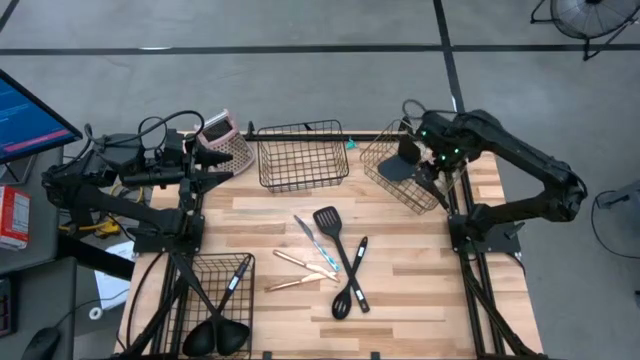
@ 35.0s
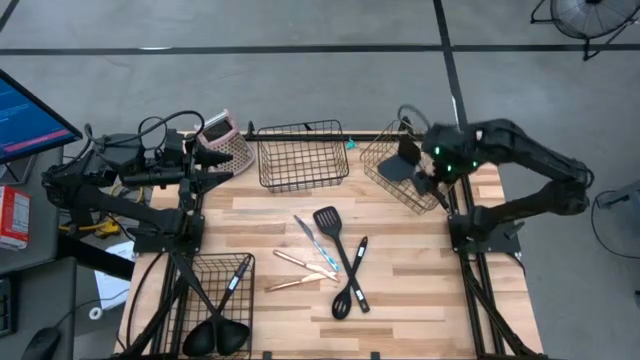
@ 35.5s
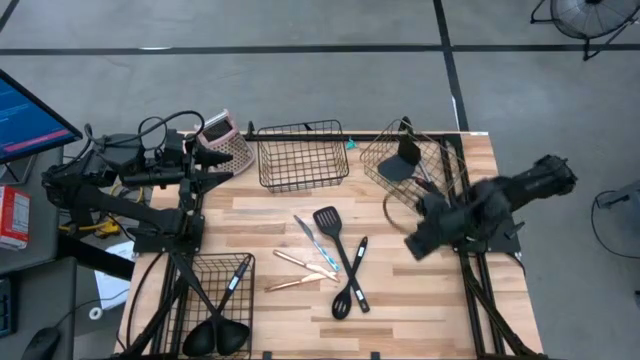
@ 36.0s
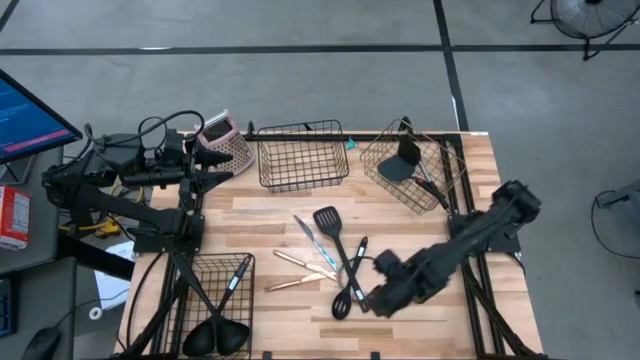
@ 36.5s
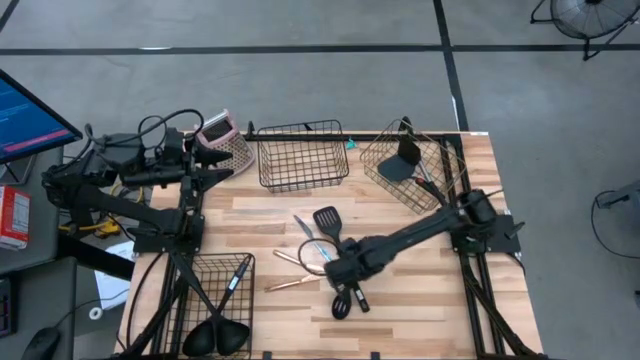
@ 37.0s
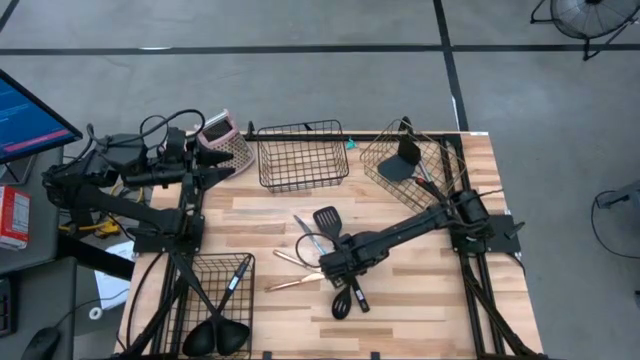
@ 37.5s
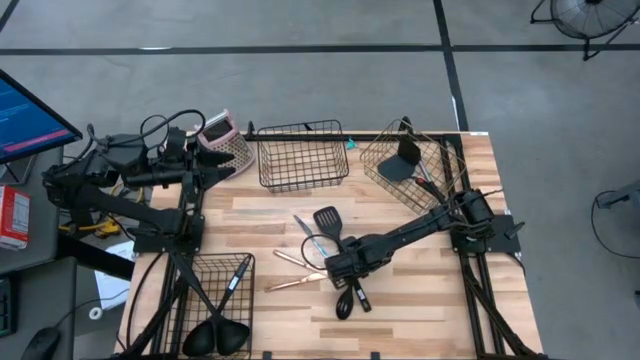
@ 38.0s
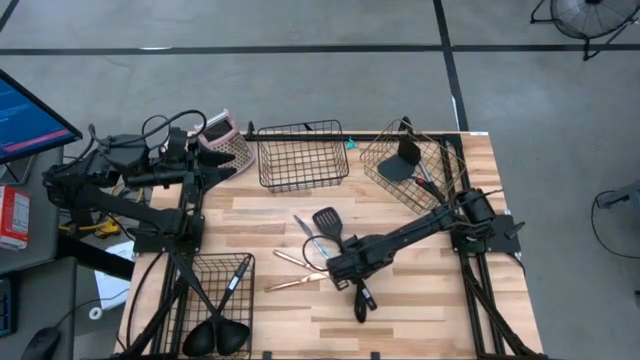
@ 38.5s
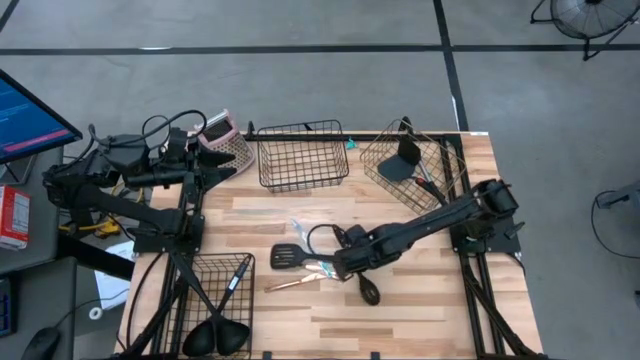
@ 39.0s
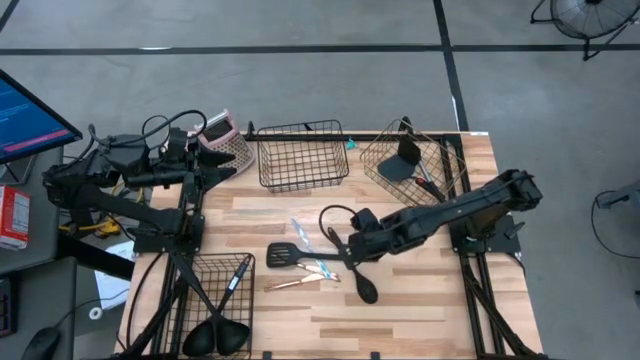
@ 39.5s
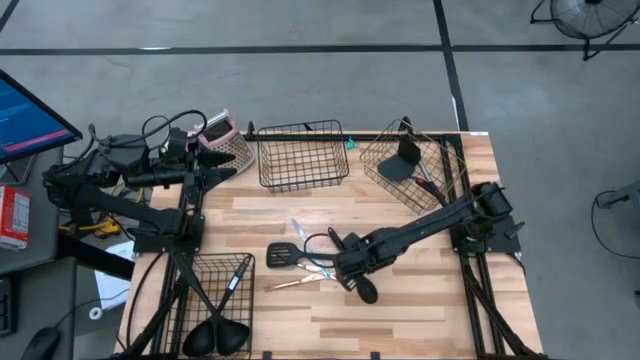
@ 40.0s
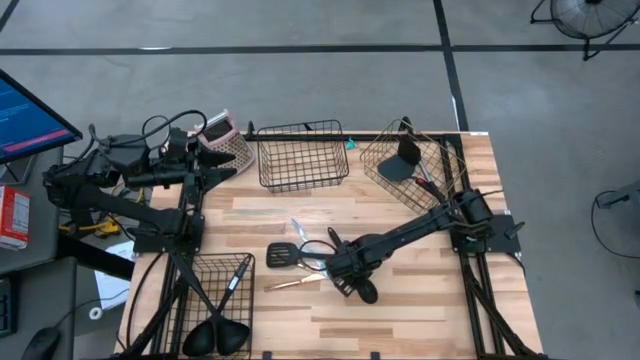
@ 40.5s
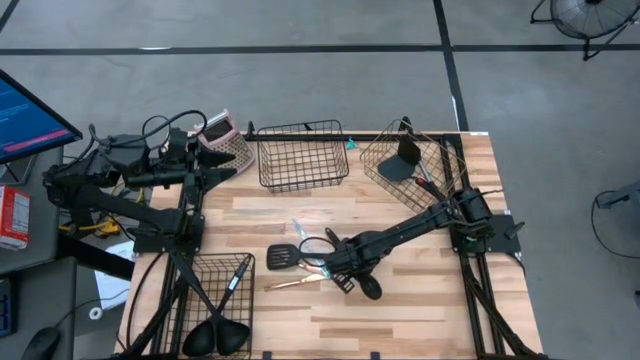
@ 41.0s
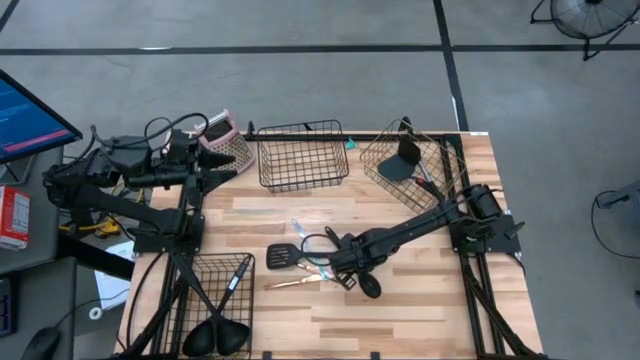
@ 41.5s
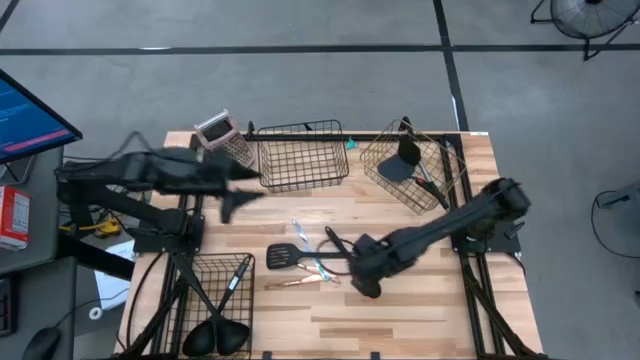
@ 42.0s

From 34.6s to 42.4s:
Task: Pick & Place Kitchen Items
Put the black serving spoon into the bottom black wire basket

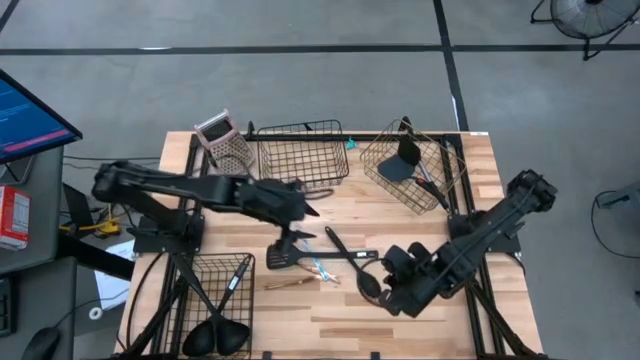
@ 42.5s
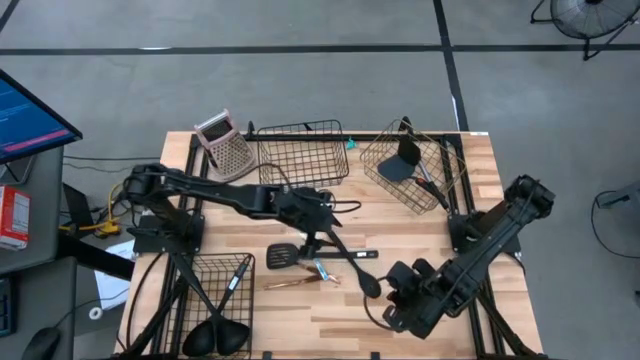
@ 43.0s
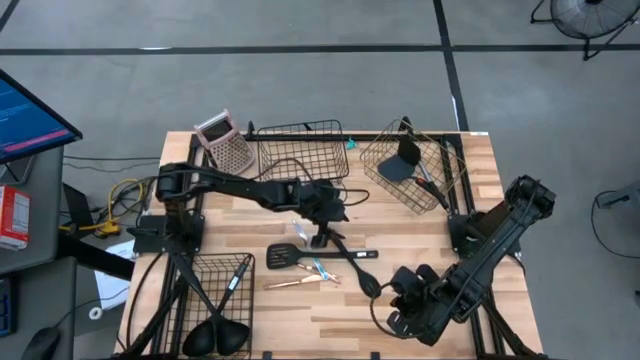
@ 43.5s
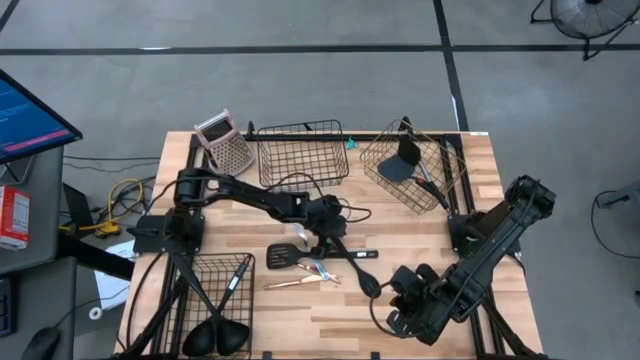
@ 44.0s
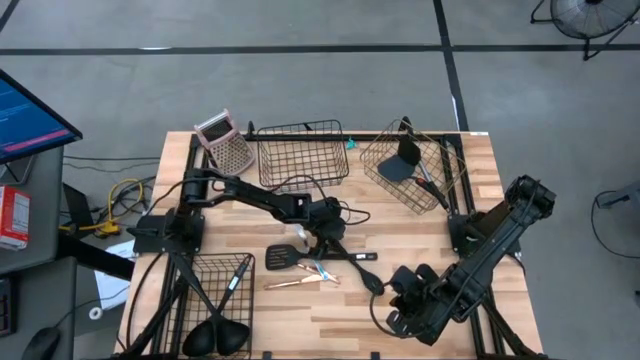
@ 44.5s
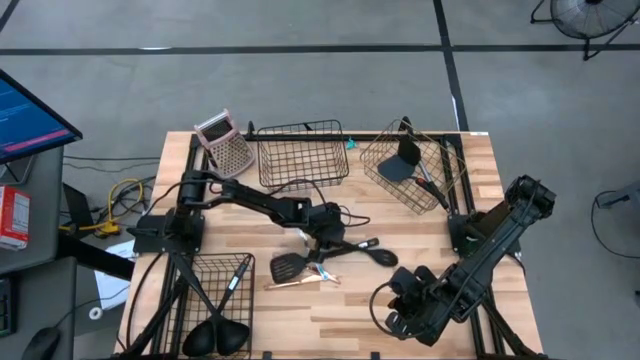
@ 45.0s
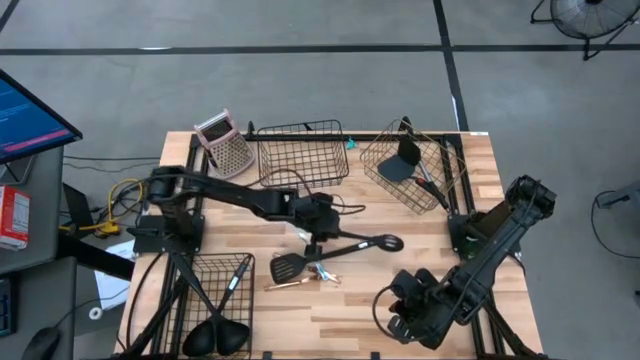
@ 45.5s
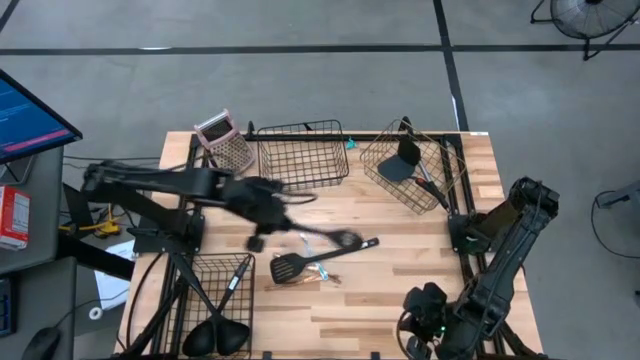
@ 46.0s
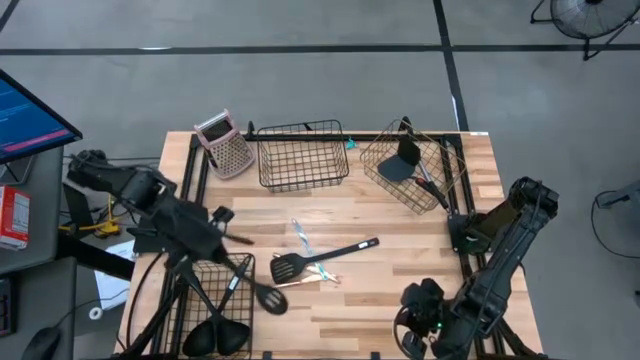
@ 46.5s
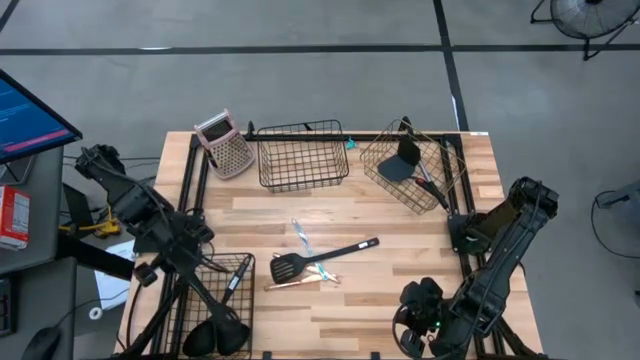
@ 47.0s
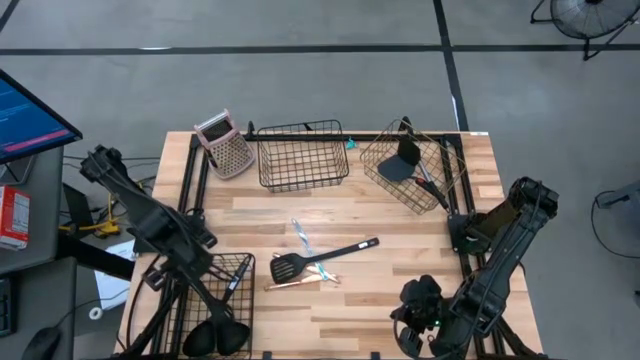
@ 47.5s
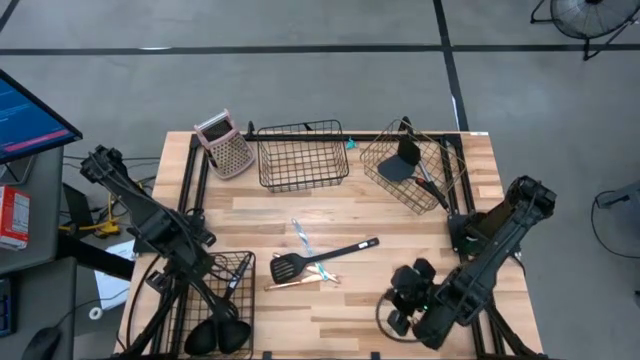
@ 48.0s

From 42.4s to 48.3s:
Put the black serving spoon into the bottom black wire basket

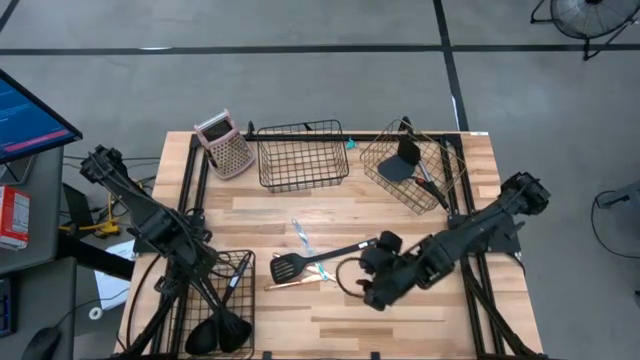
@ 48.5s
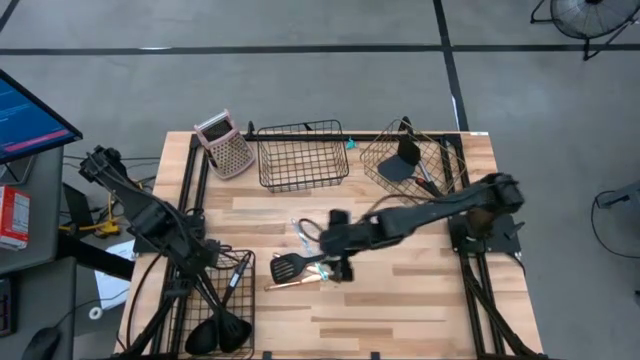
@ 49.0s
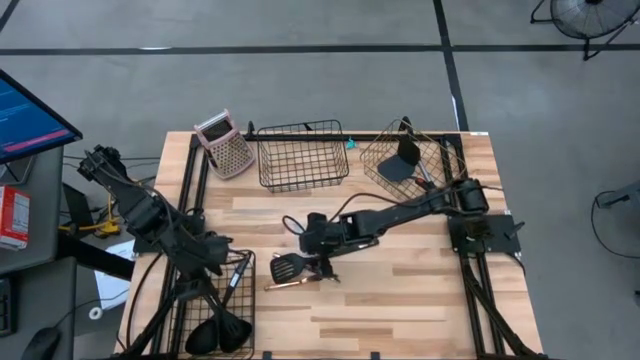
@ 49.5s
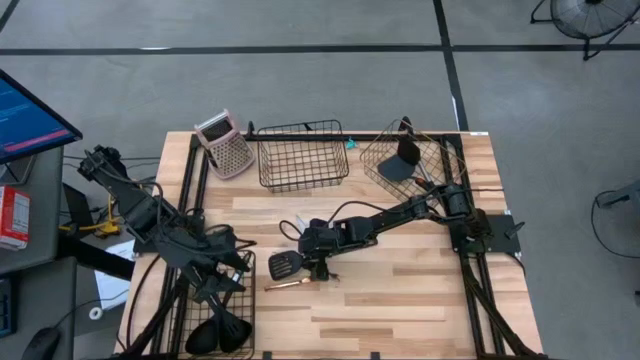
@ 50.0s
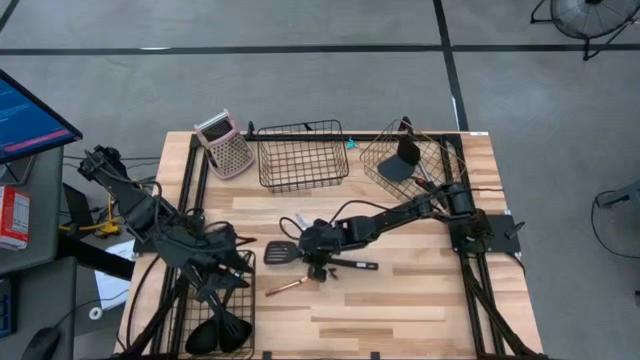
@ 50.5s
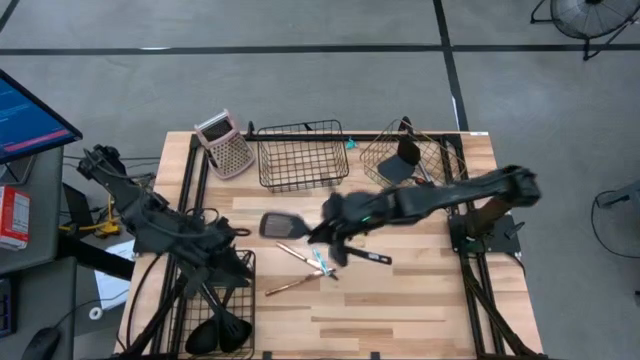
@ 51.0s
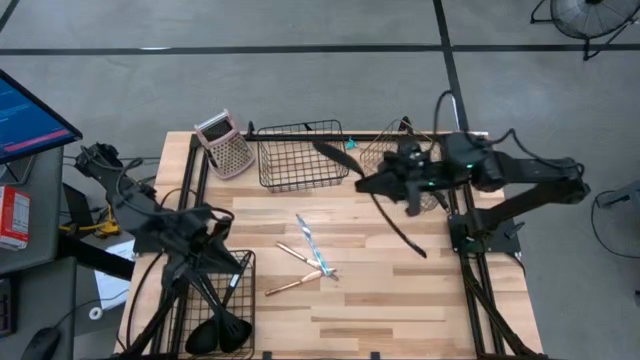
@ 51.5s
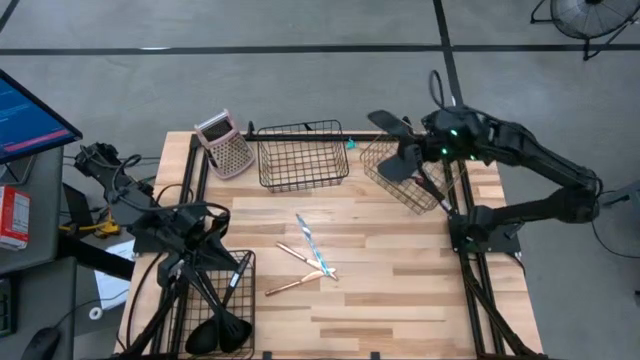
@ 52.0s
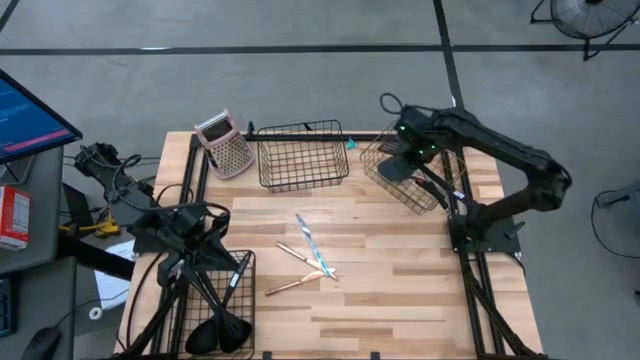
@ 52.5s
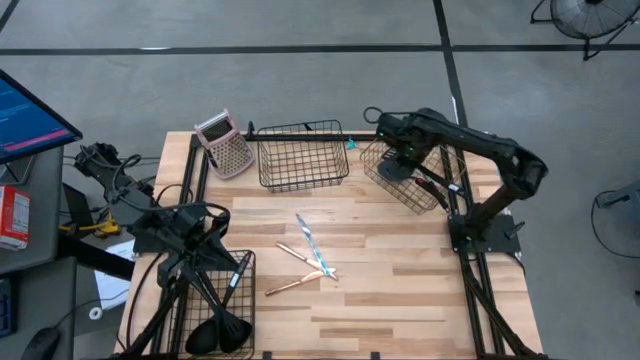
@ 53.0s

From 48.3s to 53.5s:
Put the black spatula into the brown wire basket

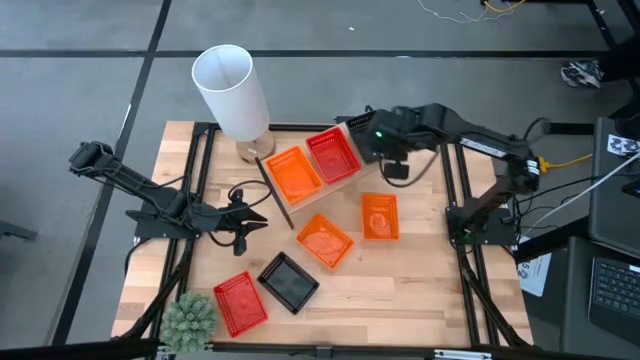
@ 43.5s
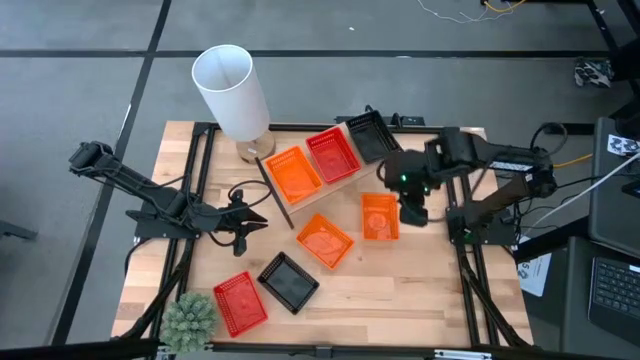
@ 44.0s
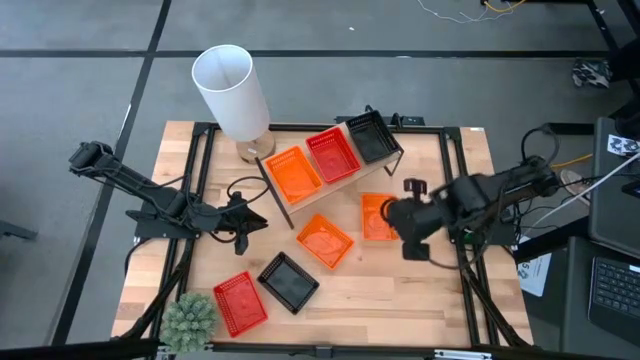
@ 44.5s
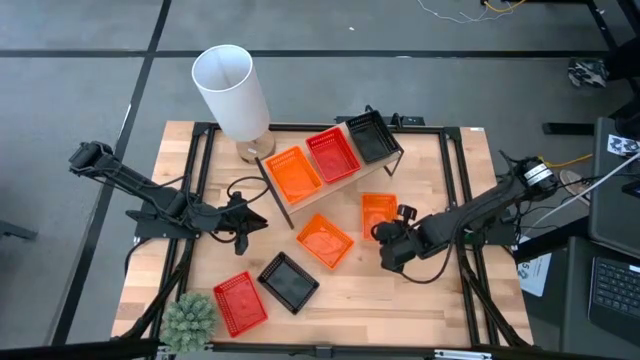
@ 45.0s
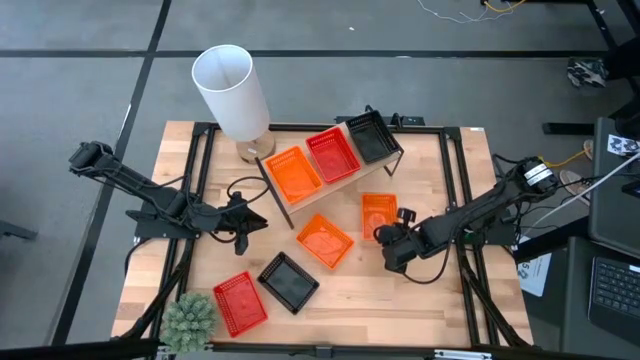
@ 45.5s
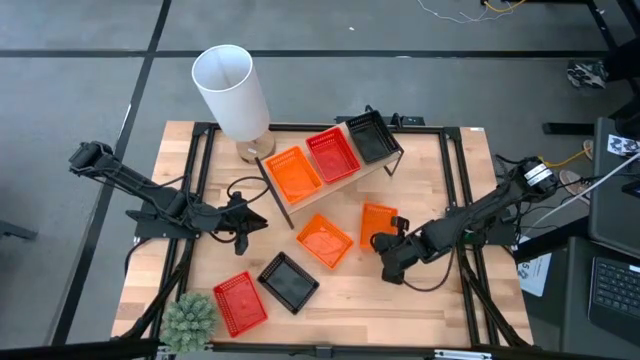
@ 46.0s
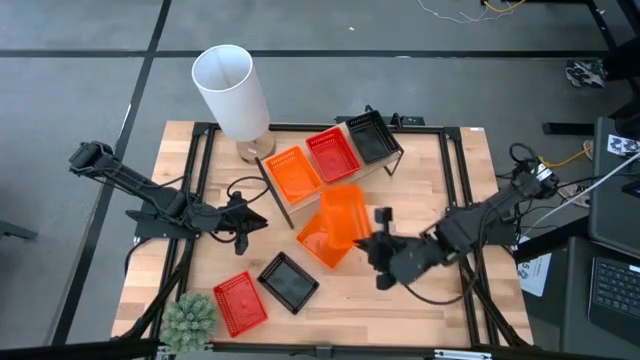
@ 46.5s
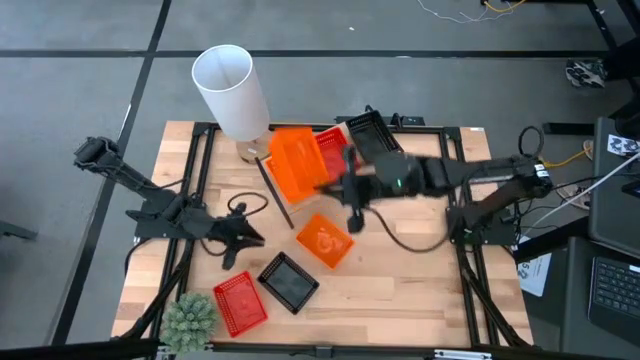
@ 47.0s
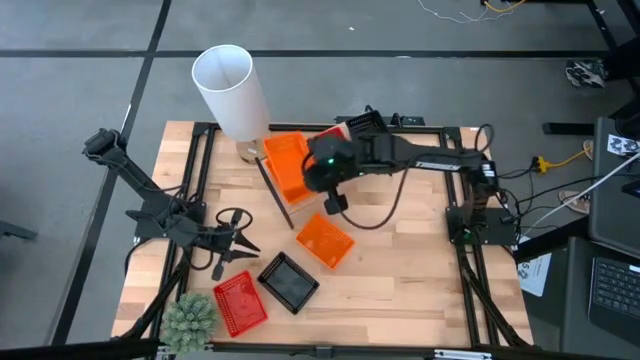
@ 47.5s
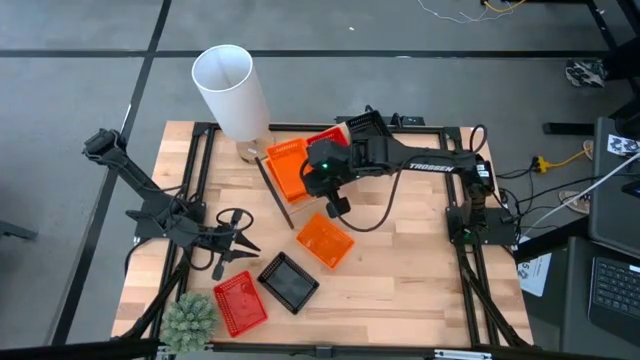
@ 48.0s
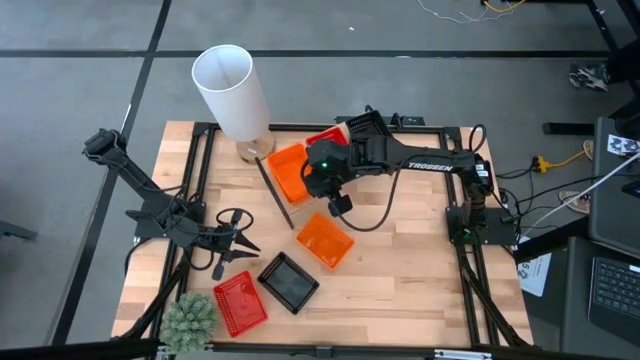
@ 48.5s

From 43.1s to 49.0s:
Task: Stack baskets on shelf by color
Stack the top orange basket on top of the other orange basket on the shelf
